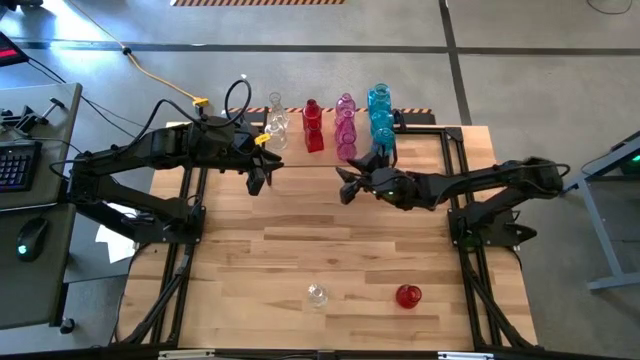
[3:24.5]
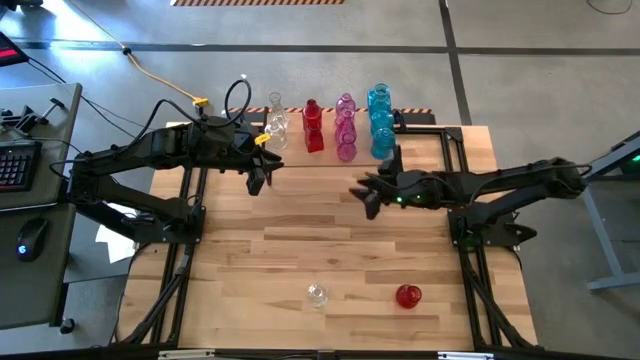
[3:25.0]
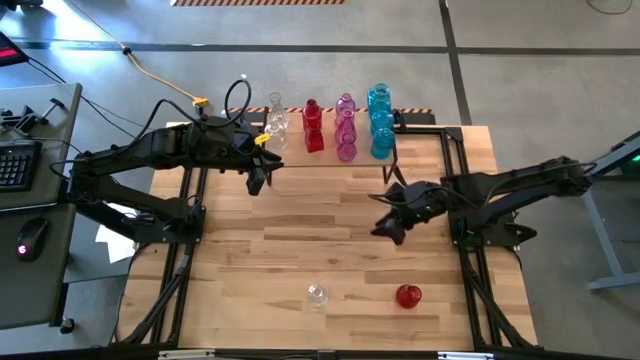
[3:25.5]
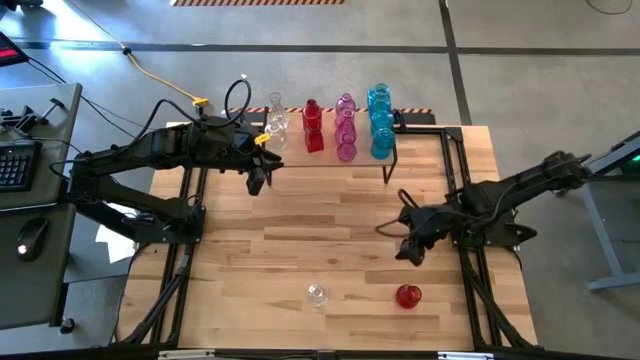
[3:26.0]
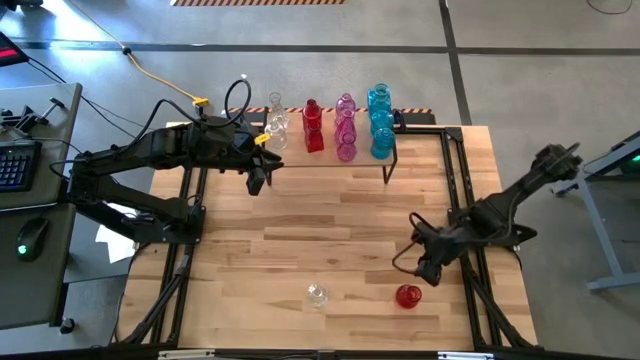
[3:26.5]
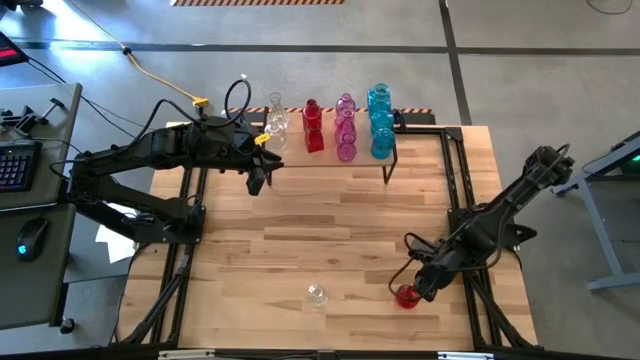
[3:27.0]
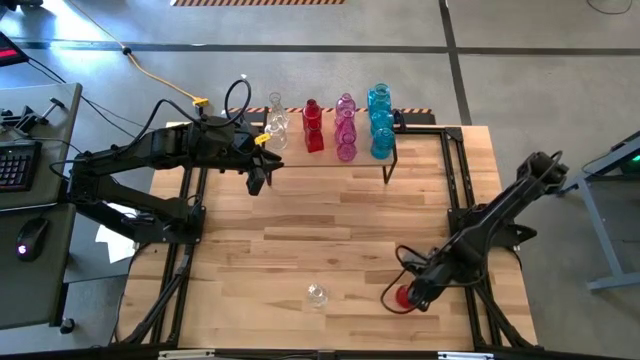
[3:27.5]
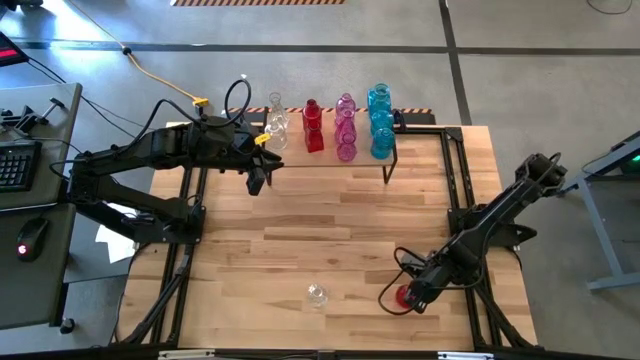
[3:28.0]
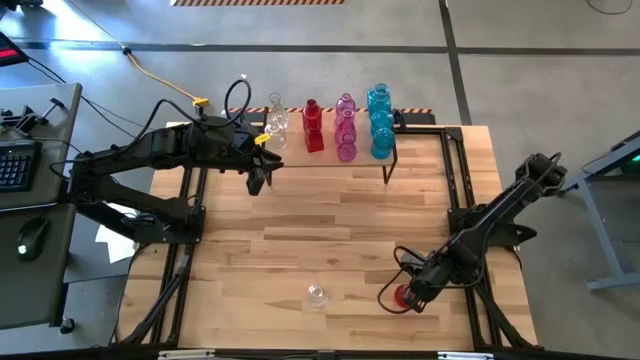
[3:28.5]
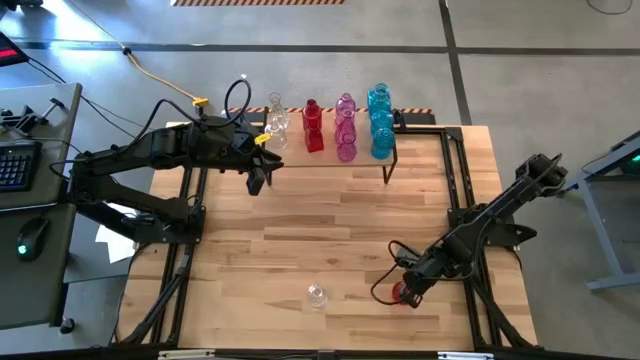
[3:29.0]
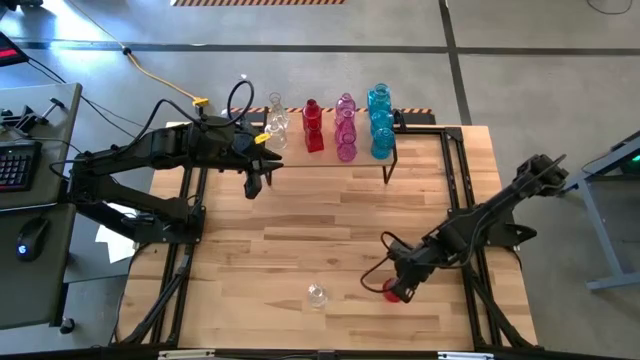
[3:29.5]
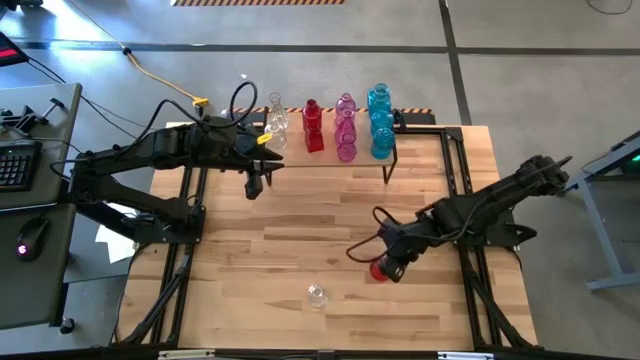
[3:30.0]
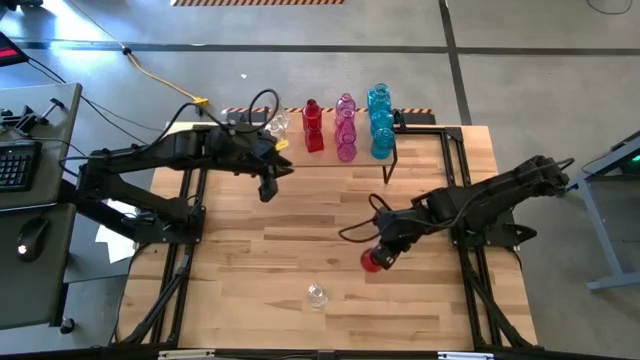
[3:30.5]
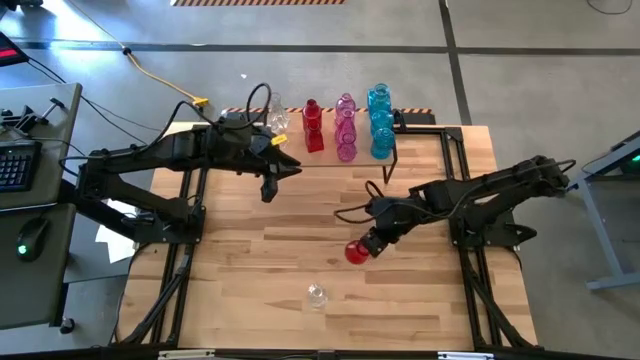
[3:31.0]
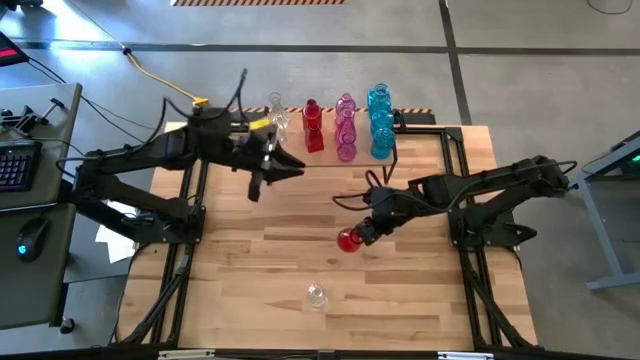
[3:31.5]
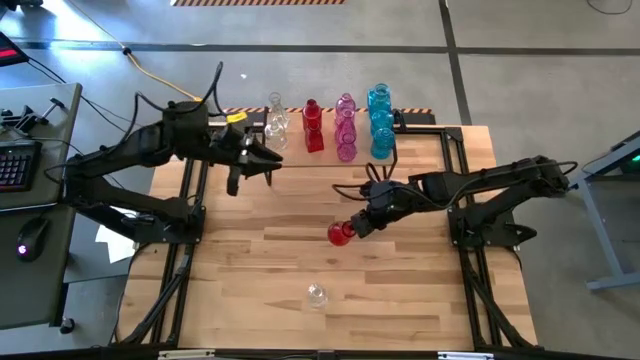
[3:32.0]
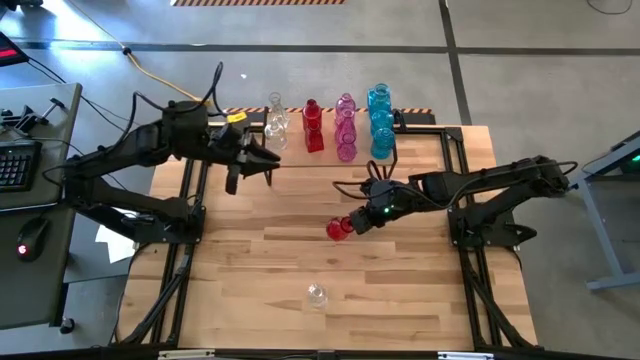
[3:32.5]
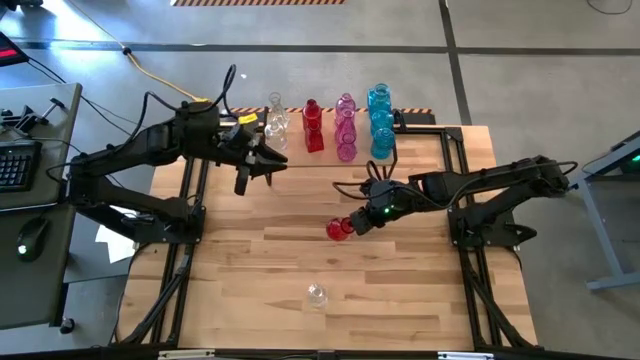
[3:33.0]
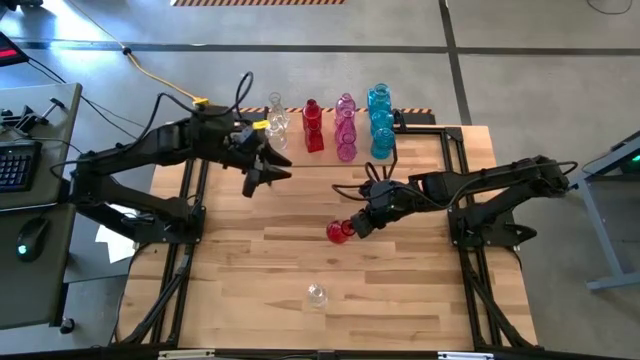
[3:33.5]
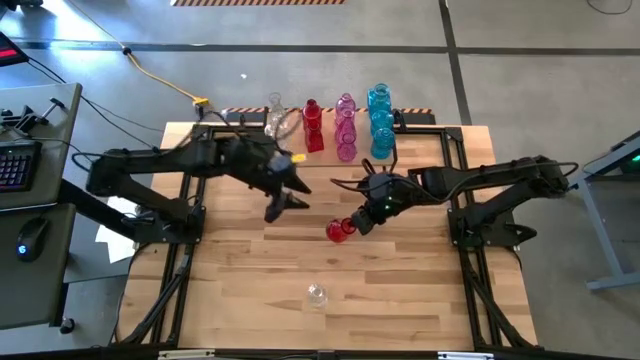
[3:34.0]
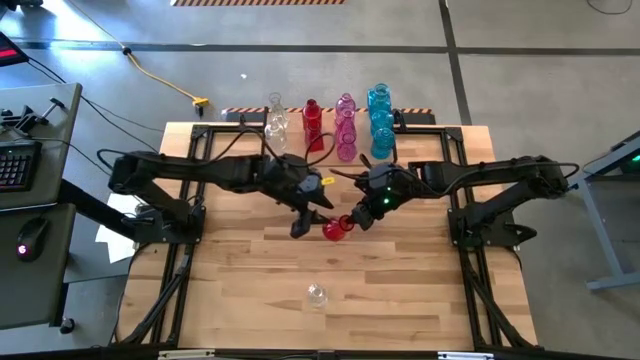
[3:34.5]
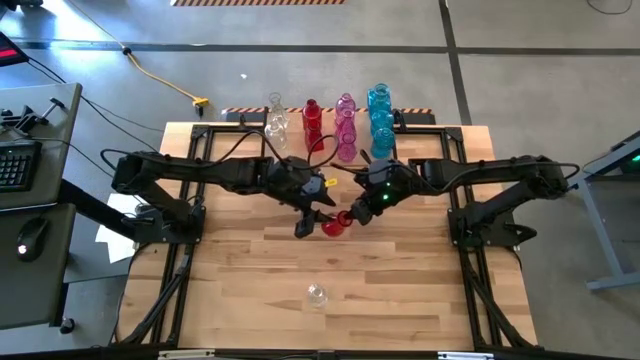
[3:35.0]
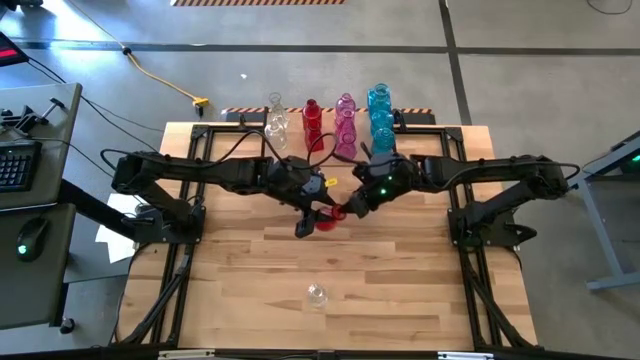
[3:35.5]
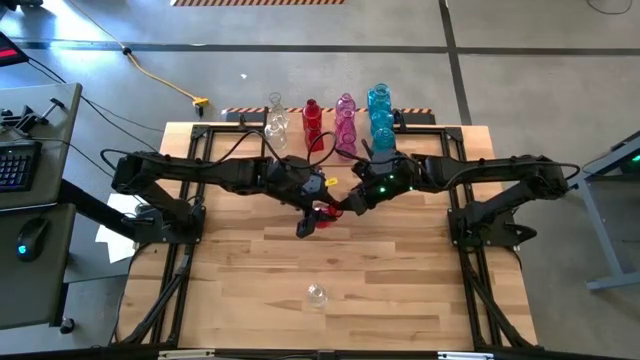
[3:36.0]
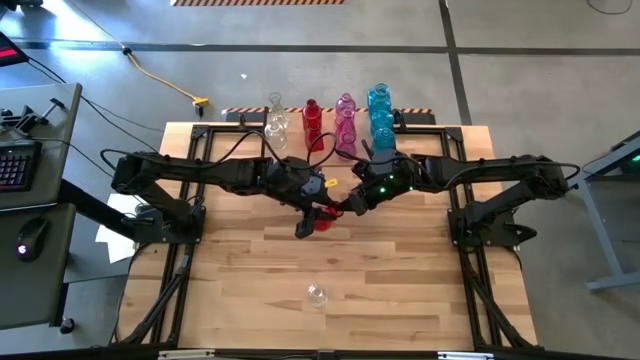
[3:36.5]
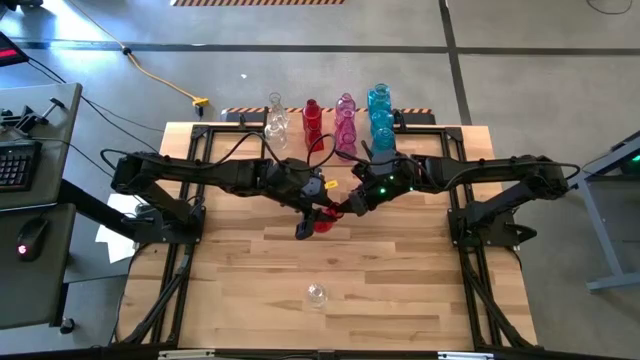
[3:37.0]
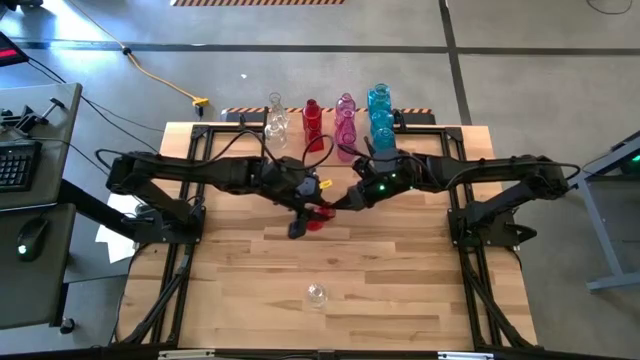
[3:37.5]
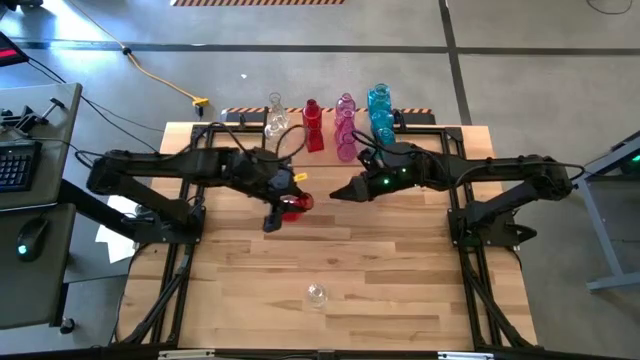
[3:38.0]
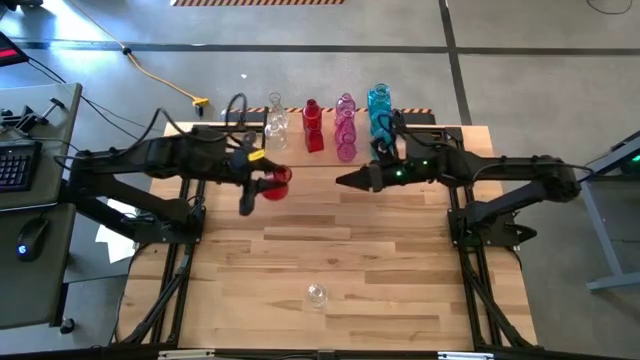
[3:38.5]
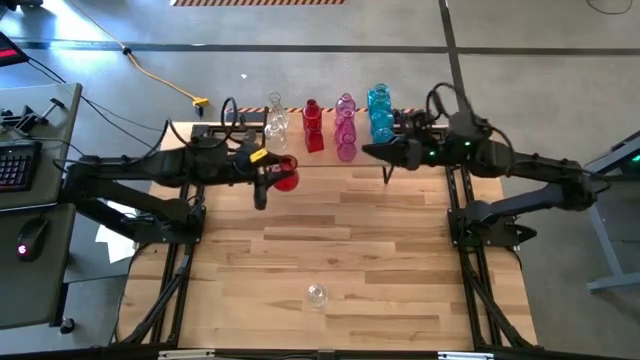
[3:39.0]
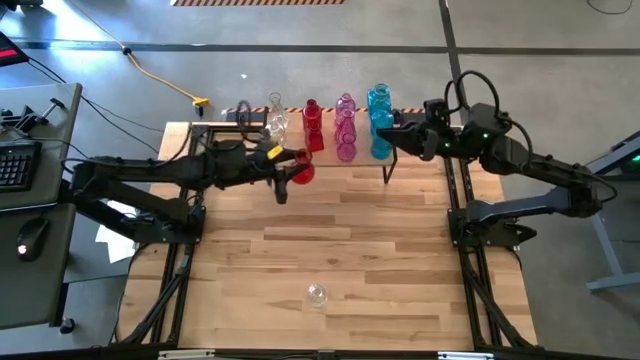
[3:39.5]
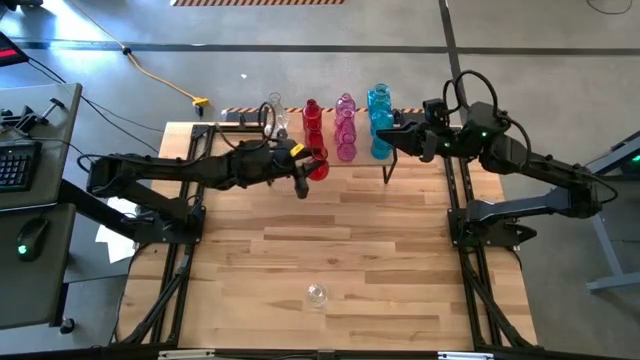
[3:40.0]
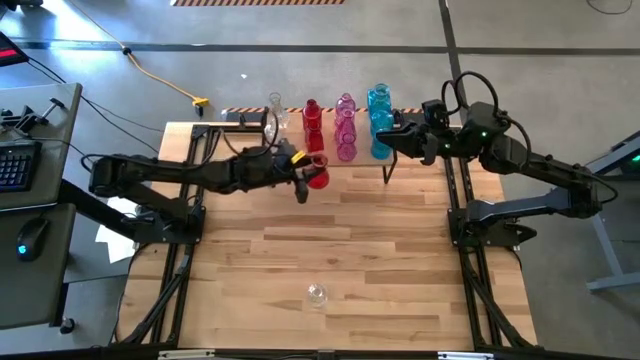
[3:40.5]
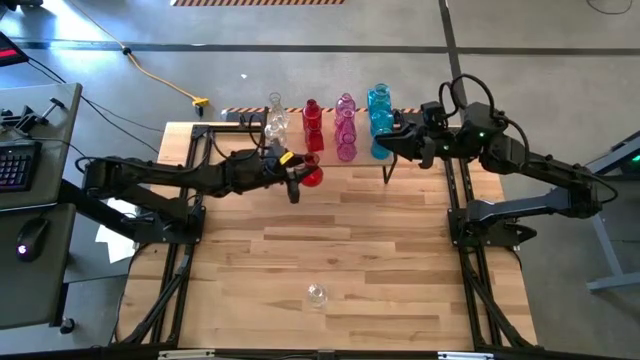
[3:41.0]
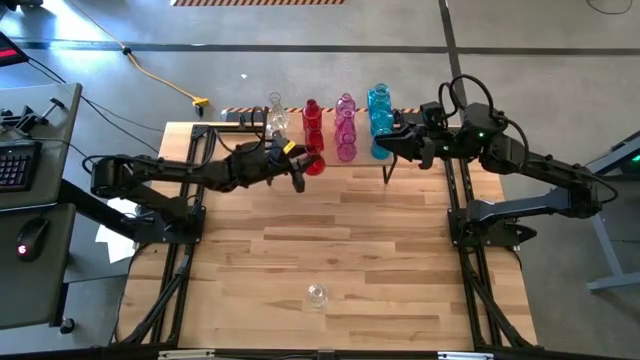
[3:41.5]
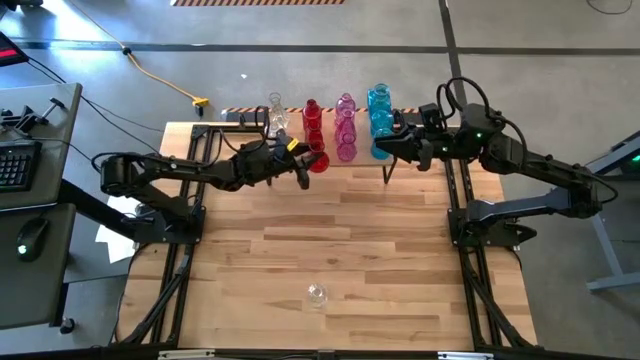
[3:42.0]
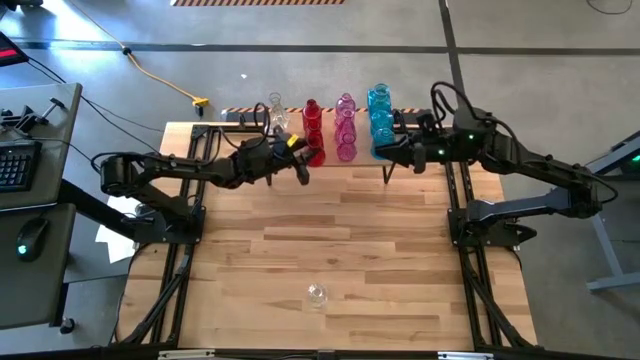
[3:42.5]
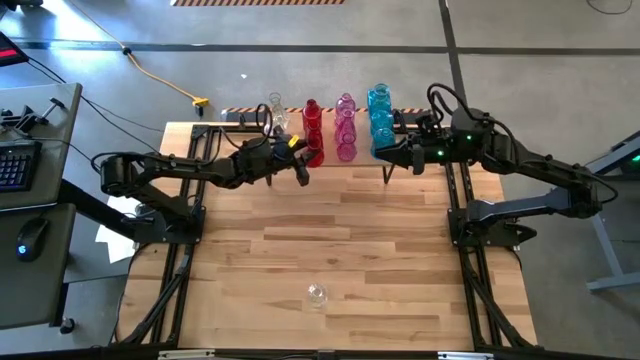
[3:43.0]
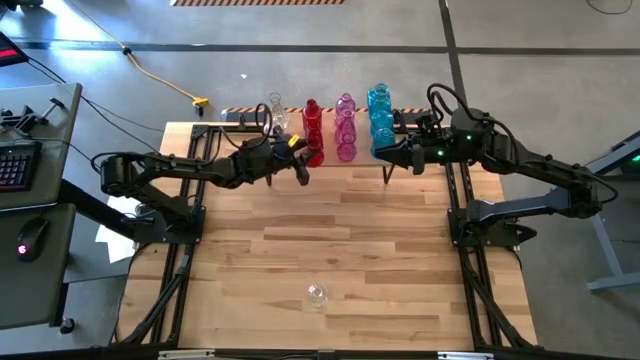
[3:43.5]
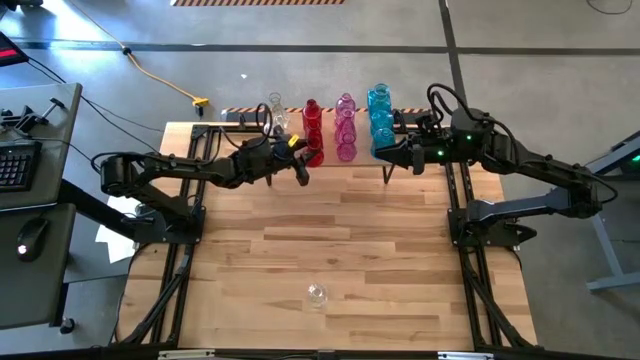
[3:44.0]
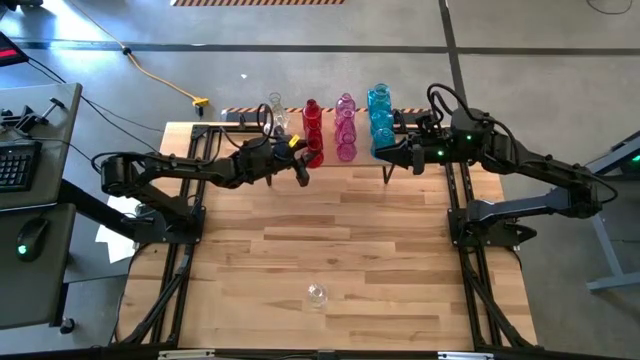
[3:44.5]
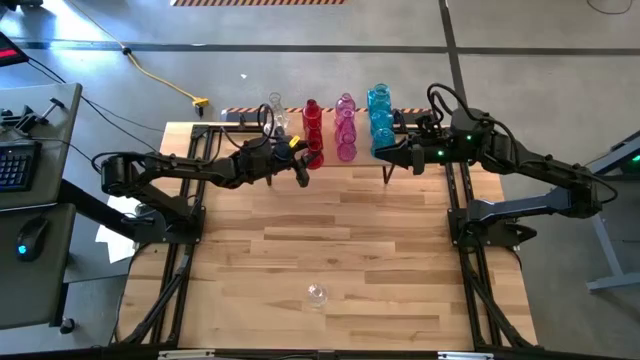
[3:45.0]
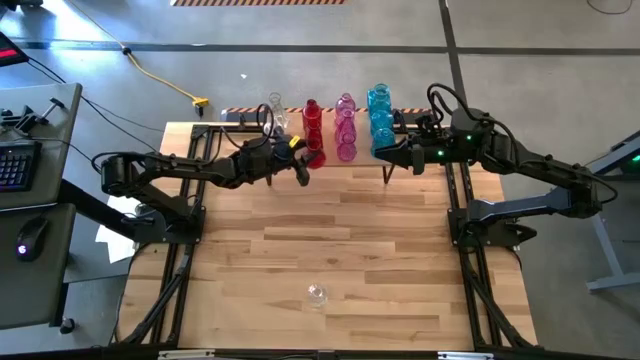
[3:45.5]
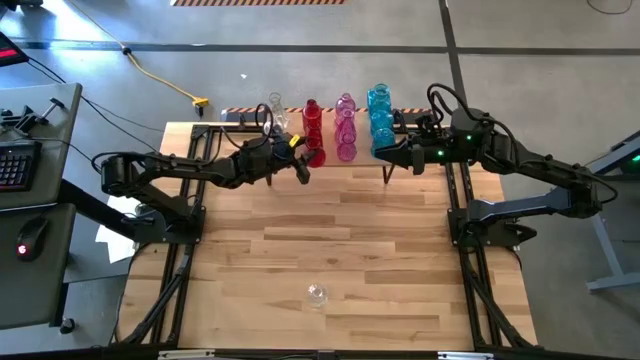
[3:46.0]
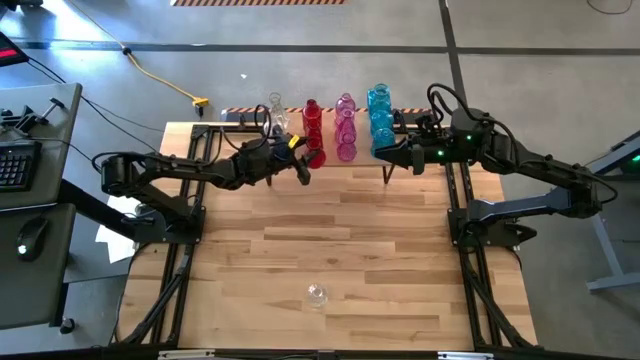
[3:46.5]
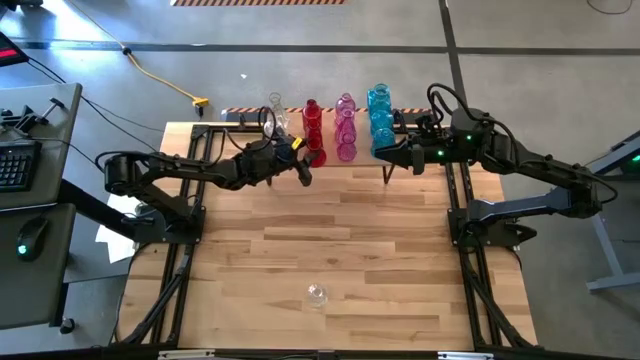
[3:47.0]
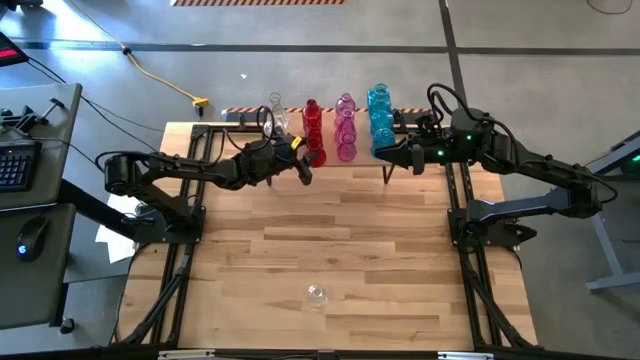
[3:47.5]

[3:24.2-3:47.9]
Task: sort vases onto shelf
Put the red vase on the shelf aligned with the other red vases
